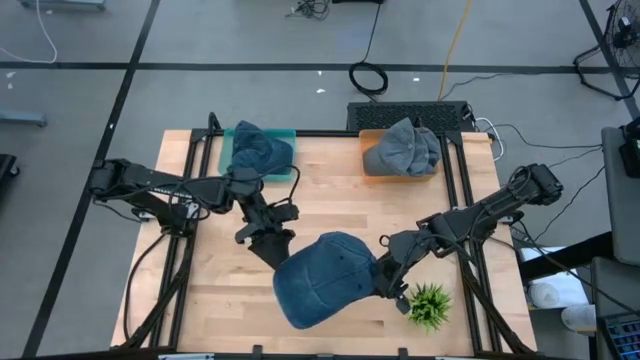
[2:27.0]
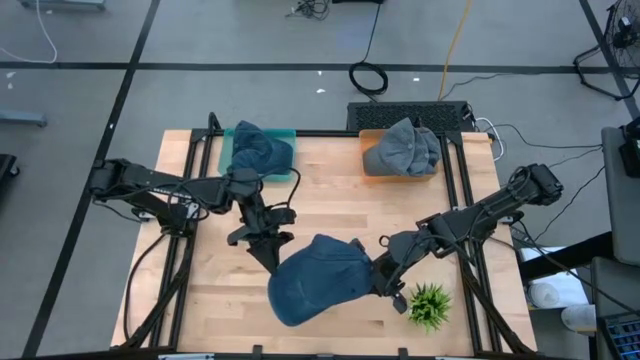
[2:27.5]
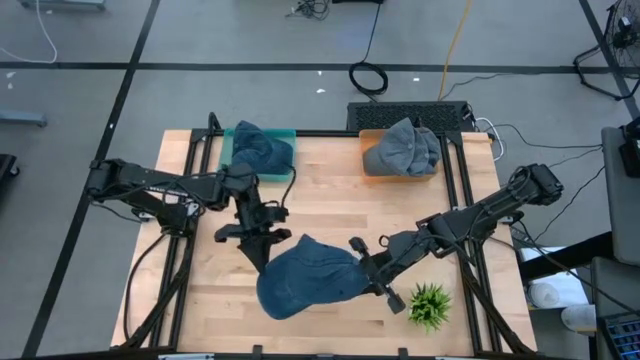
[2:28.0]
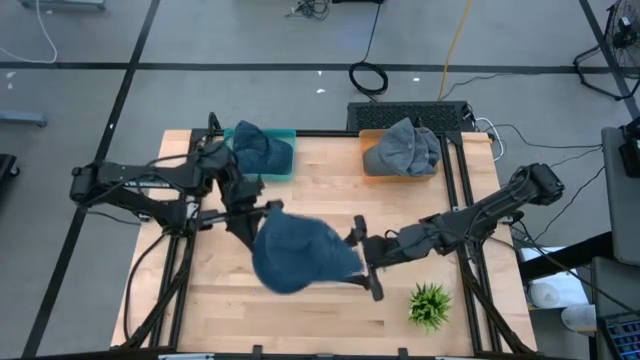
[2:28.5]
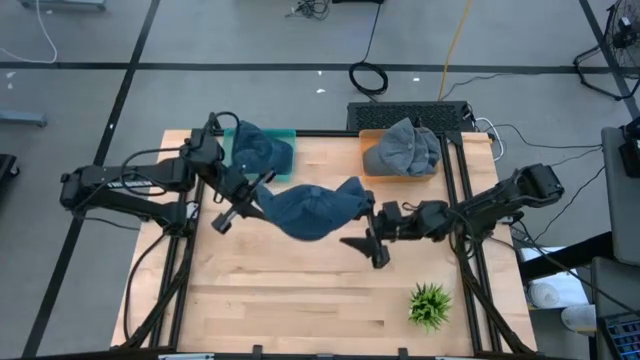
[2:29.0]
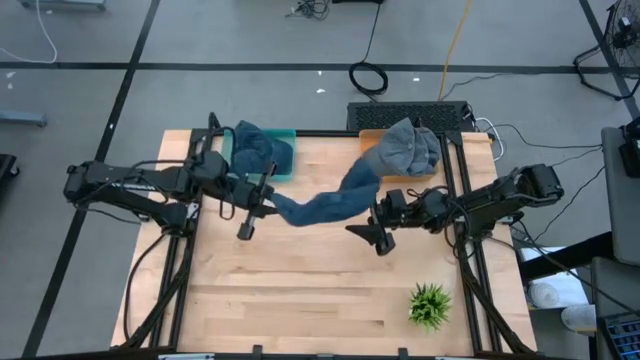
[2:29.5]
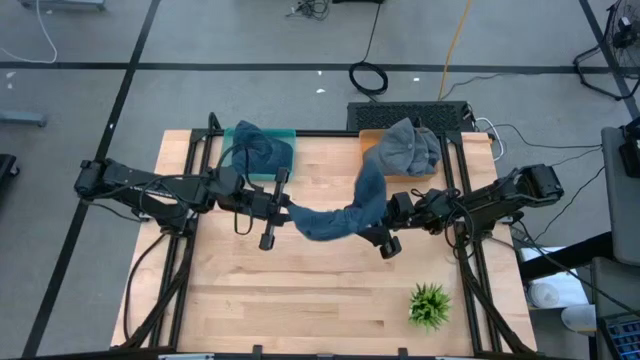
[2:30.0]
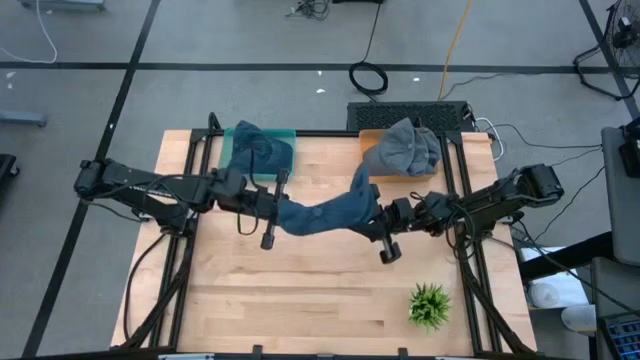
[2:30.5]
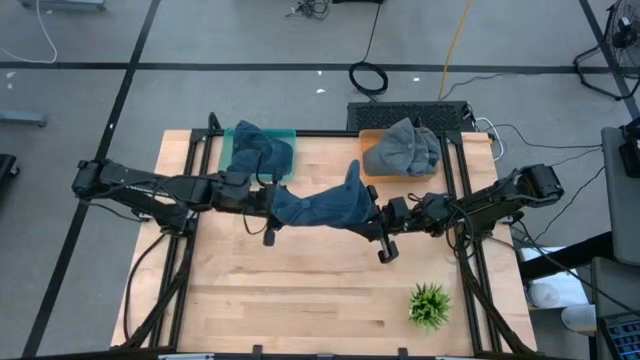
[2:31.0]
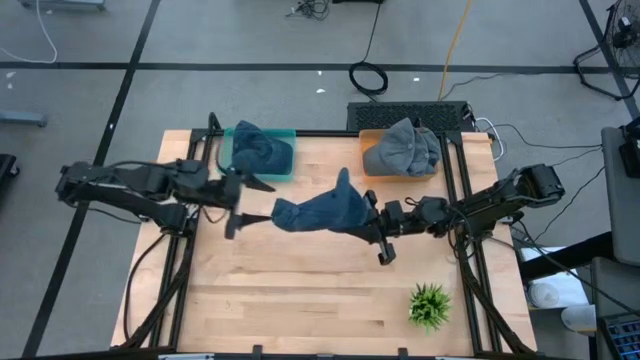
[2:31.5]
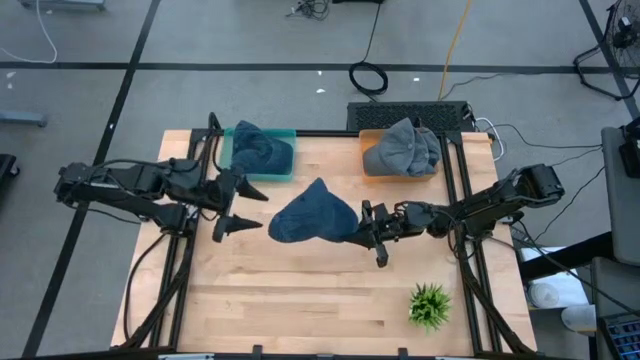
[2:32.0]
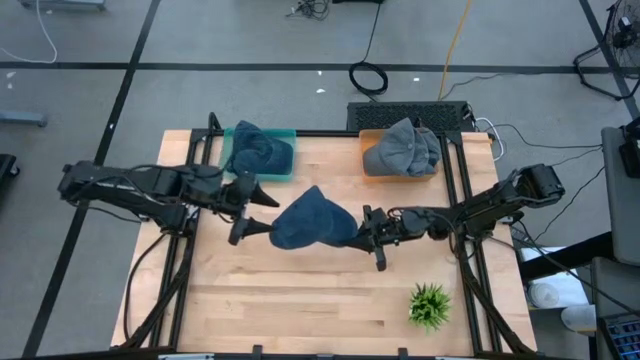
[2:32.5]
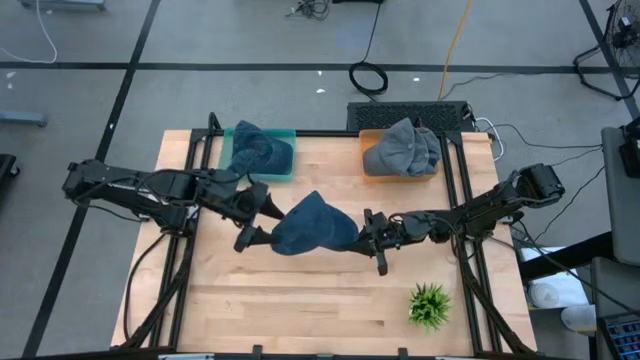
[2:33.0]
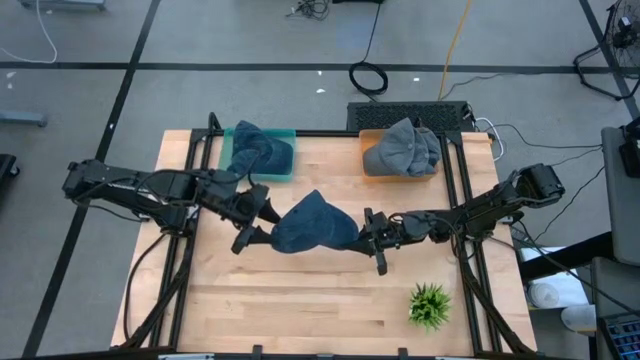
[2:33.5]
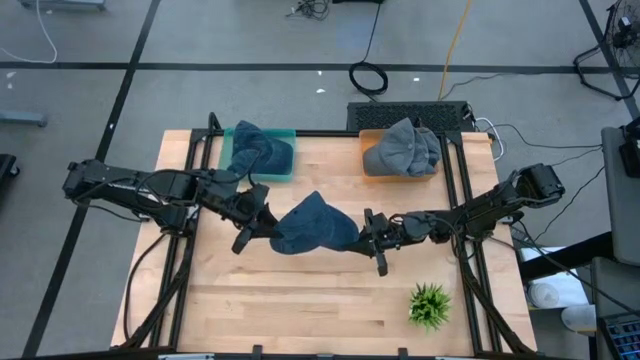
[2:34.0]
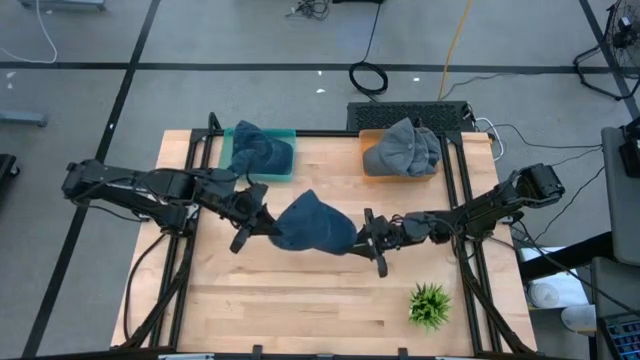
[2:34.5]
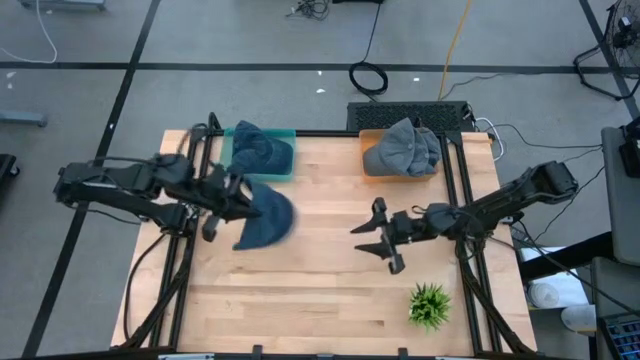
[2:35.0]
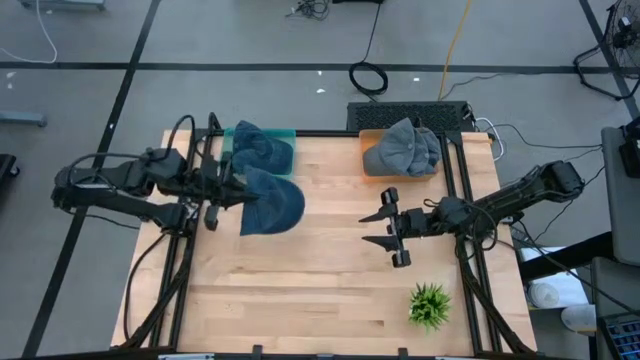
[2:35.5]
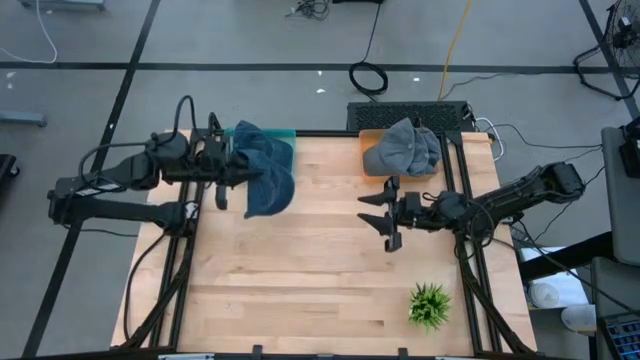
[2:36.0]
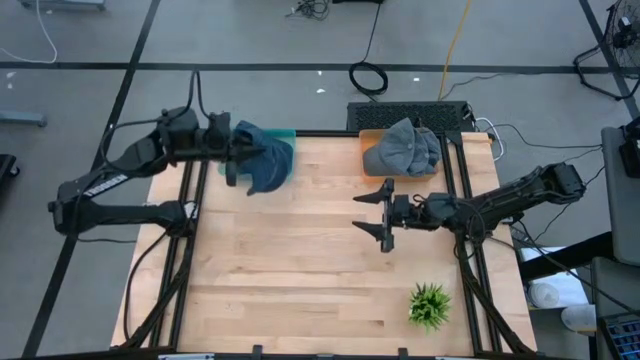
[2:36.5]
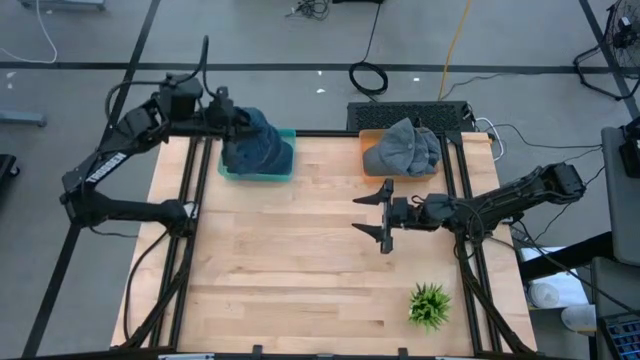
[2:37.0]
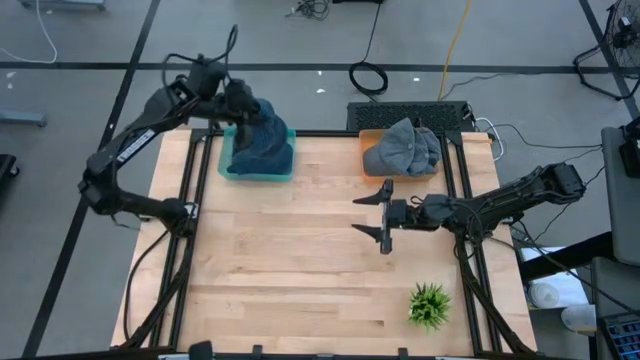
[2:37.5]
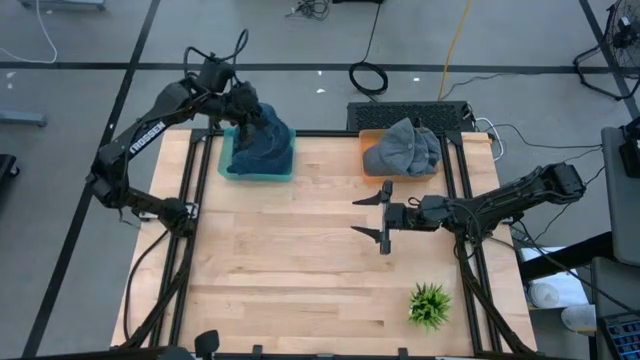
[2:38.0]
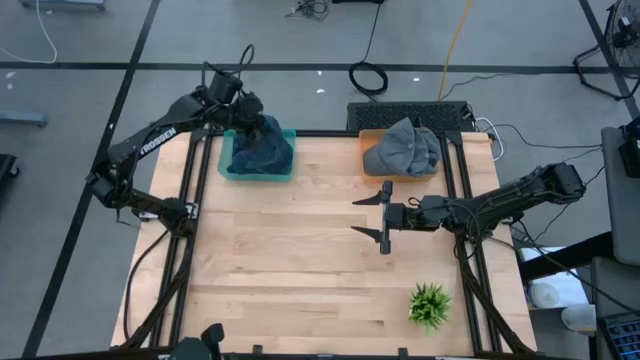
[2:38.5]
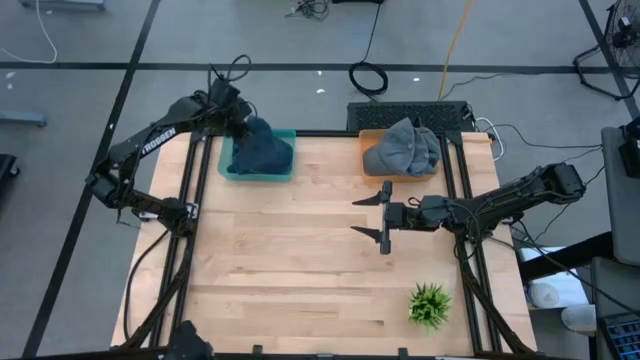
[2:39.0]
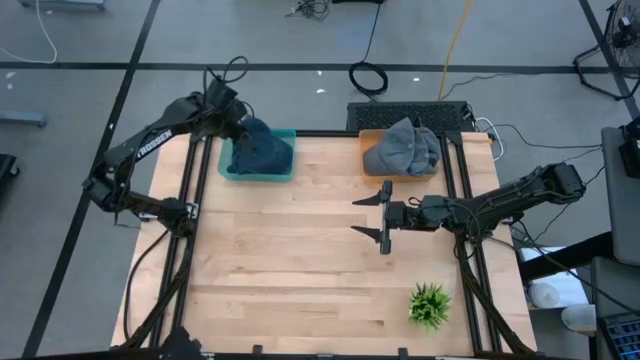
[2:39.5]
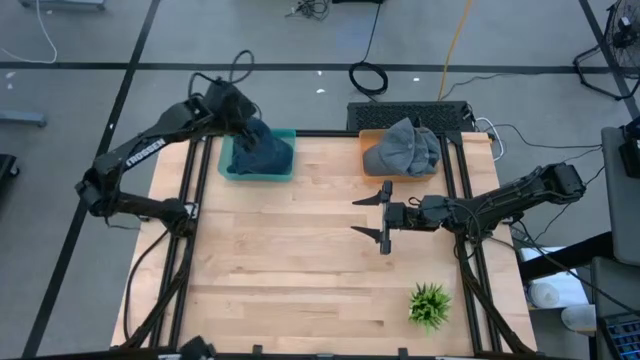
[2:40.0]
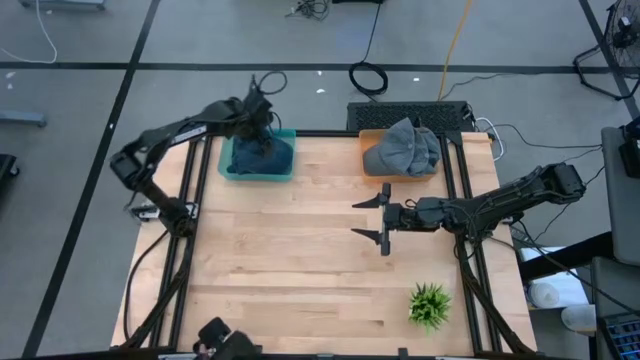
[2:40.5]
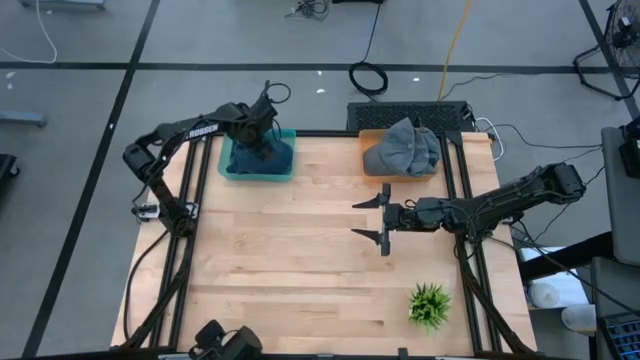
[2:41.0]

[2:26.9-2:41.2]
Task: Pick & Place hat
Put the dark blue cap into the blue bin

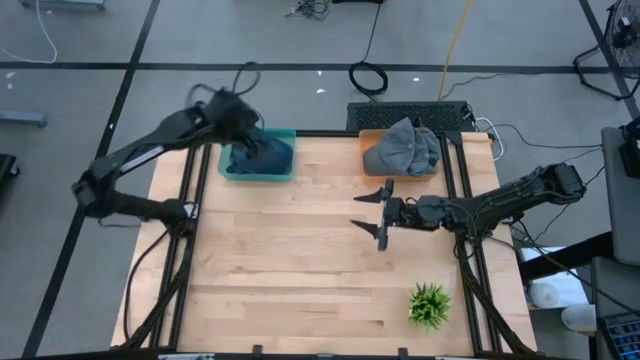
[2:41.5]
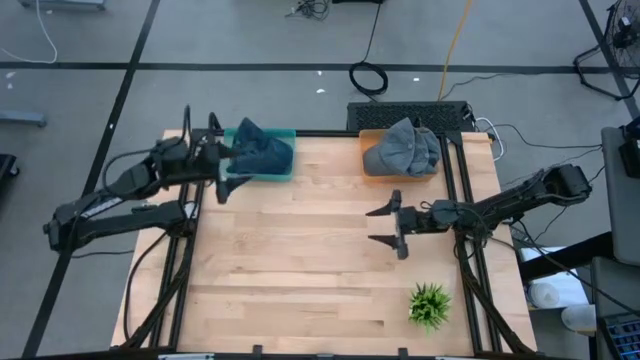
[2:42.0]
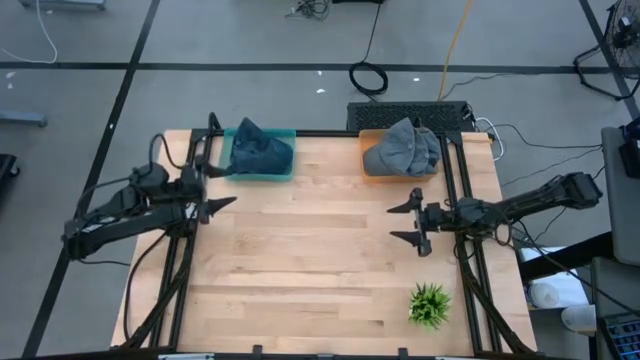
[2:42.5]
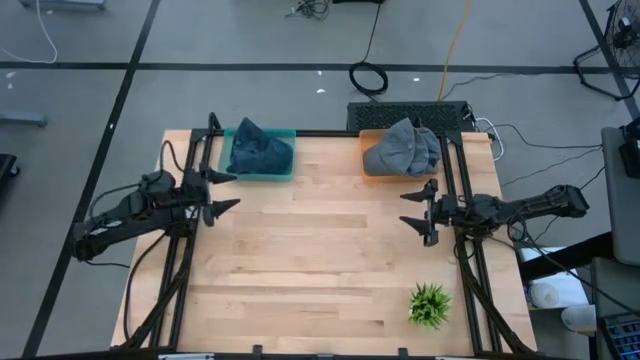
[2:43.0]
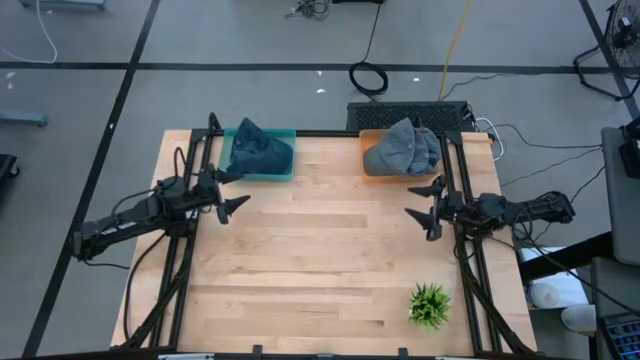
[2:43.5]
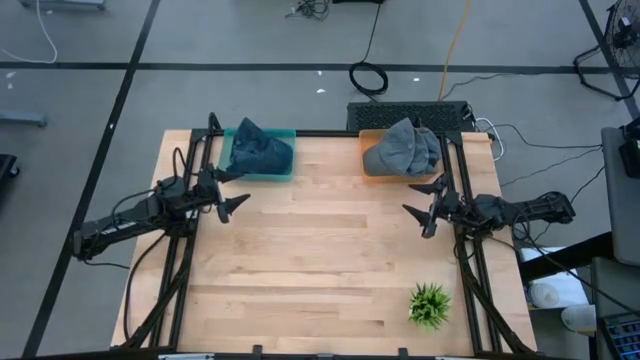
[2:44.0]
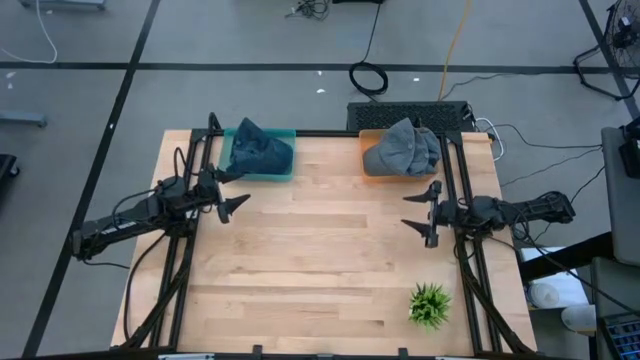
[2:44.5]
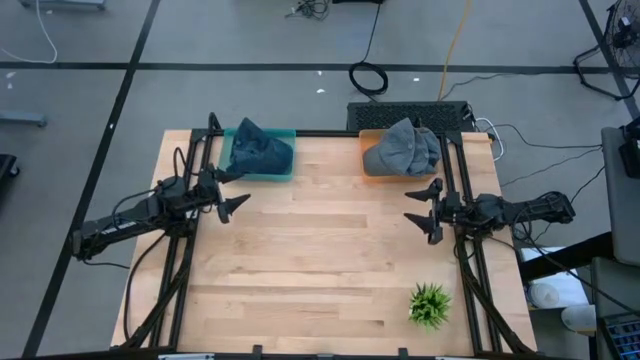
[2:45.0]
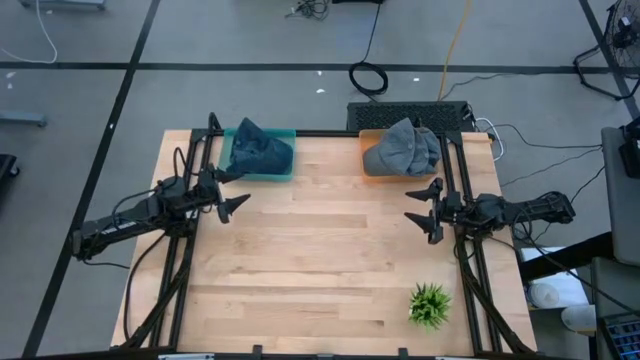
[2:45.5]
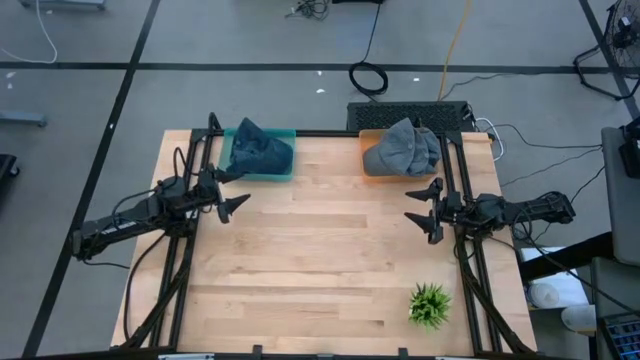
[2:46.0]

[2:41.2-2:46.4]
Return to Home Position

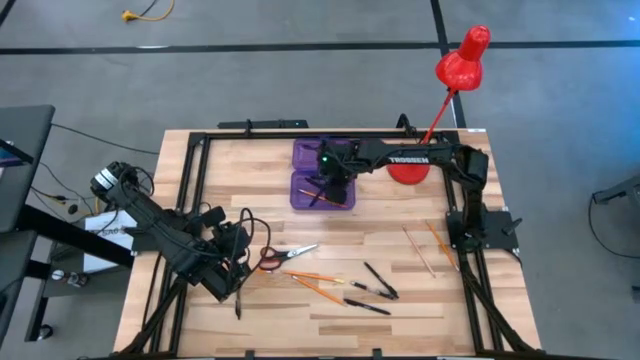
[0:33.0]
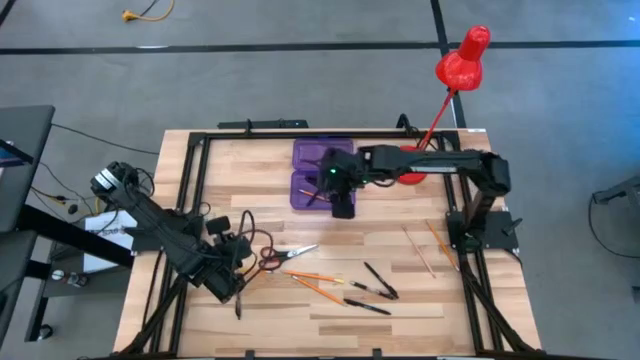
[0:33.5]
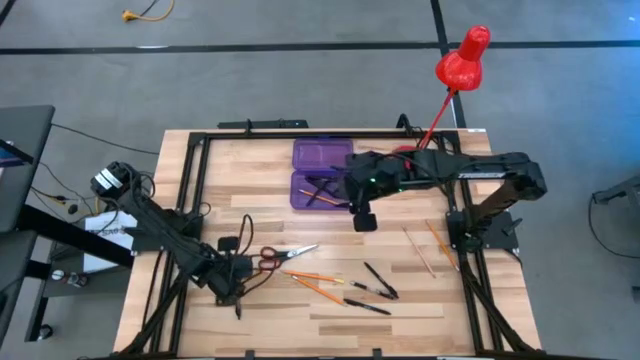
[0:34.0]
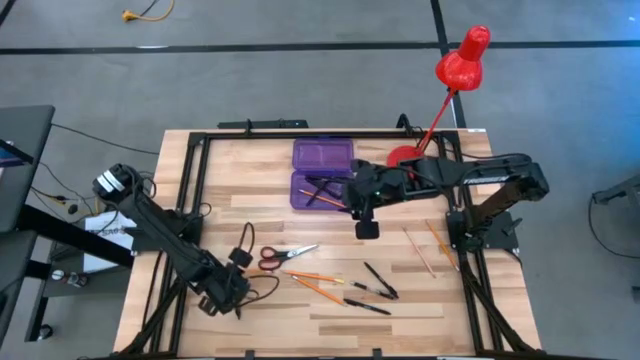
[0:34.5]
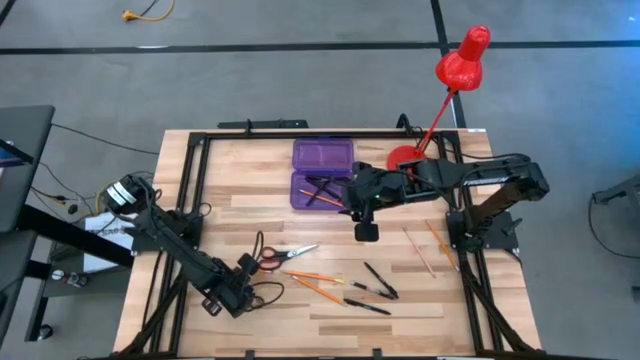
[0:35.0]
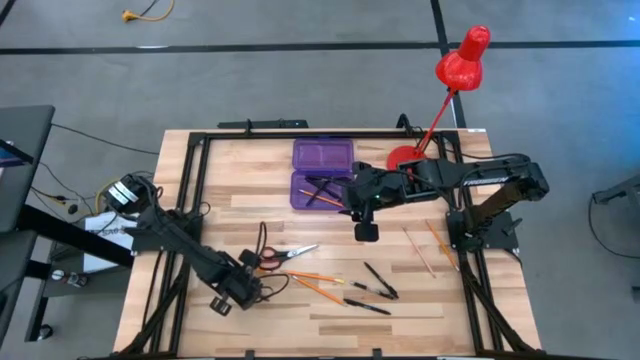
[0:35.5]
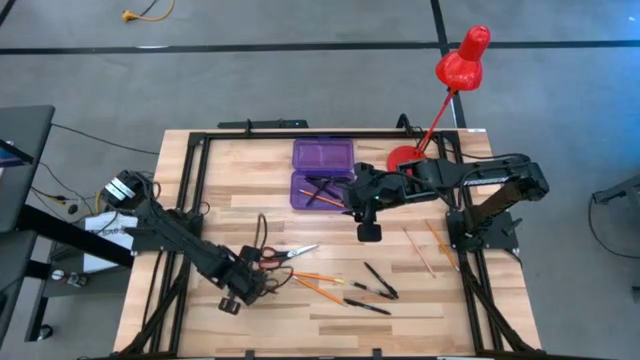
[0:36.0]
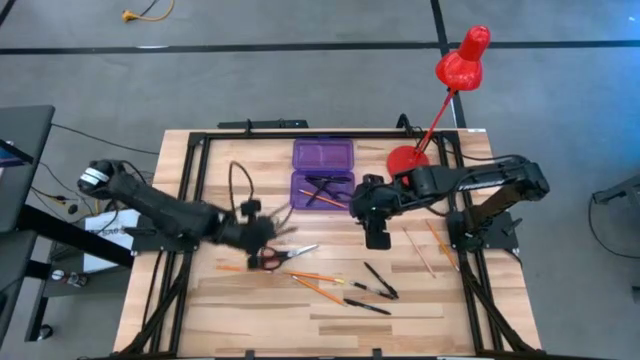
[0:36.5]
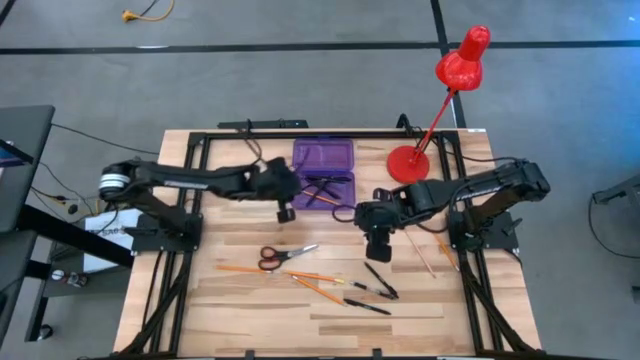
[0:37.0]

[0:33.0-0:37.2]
Task: Pick & place school supplies into a supply box
Put the black pen into the purple supply box
